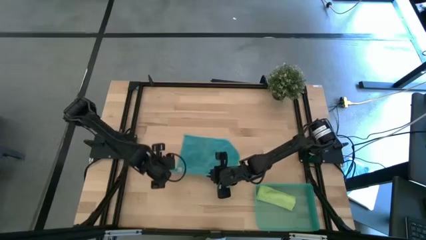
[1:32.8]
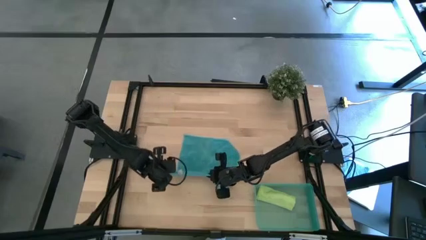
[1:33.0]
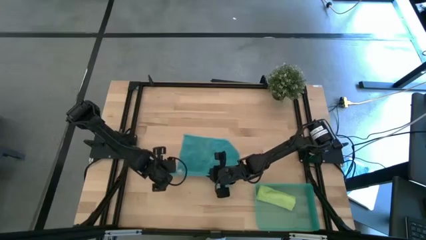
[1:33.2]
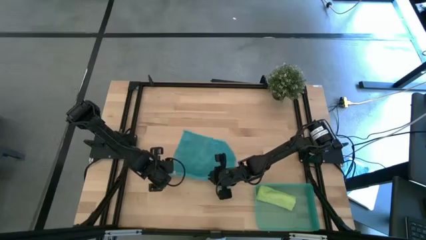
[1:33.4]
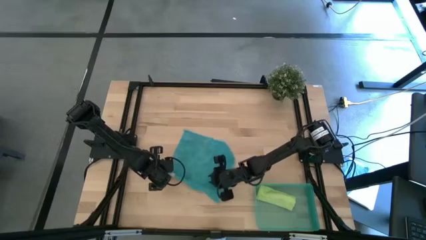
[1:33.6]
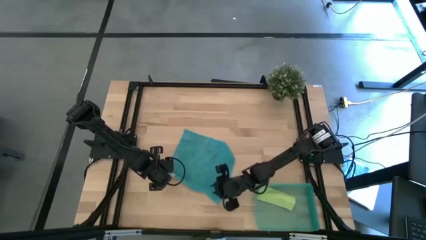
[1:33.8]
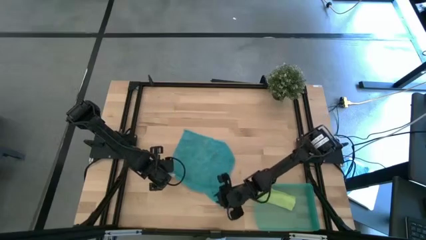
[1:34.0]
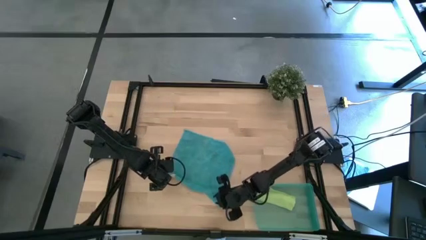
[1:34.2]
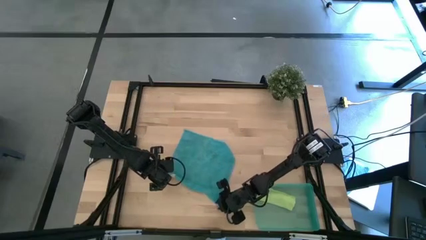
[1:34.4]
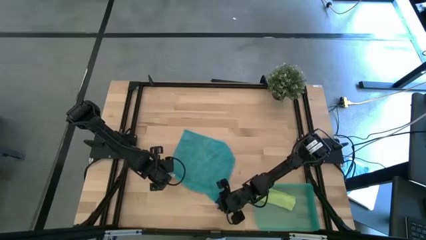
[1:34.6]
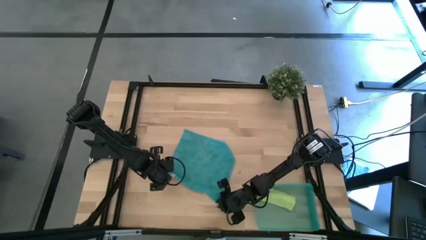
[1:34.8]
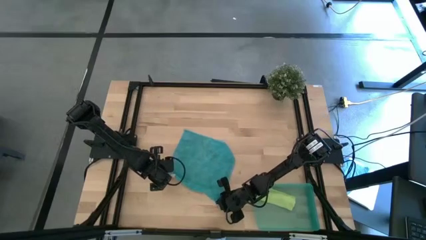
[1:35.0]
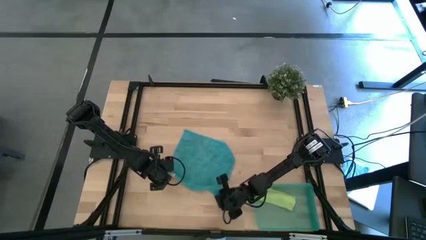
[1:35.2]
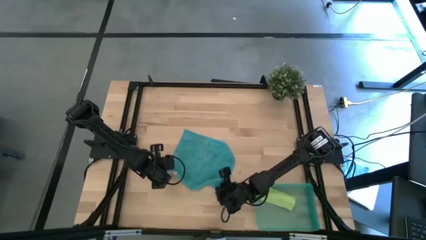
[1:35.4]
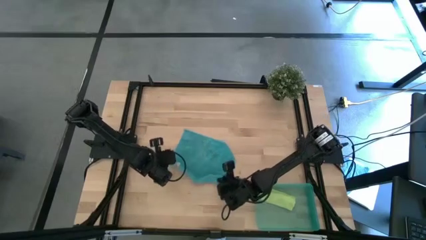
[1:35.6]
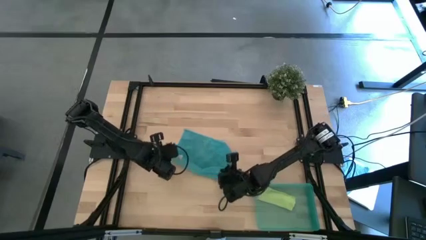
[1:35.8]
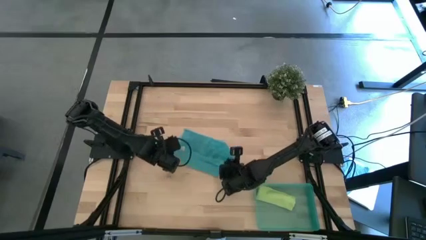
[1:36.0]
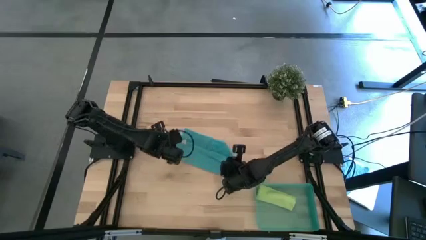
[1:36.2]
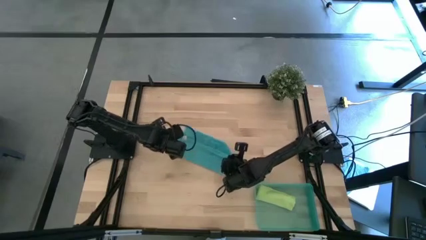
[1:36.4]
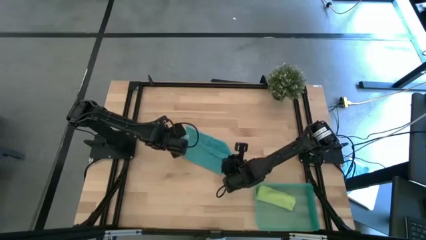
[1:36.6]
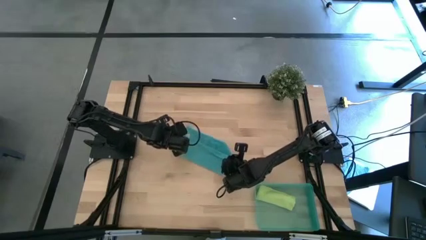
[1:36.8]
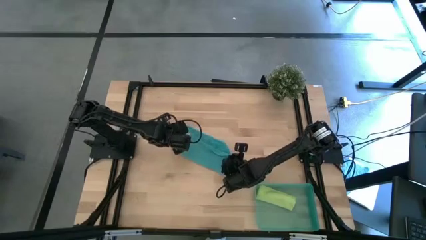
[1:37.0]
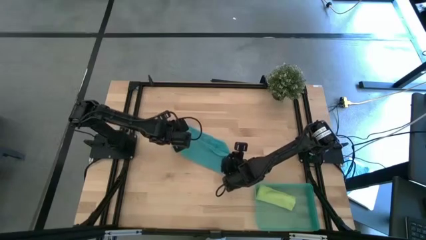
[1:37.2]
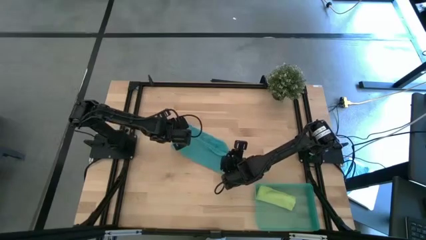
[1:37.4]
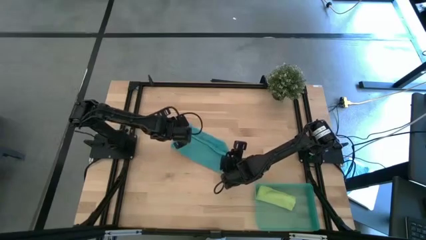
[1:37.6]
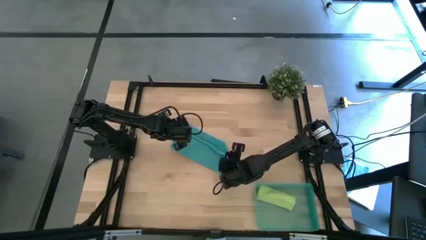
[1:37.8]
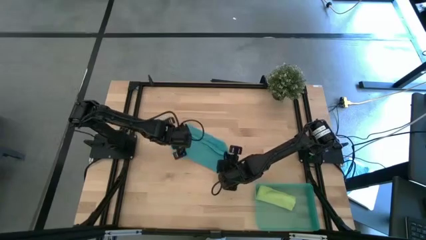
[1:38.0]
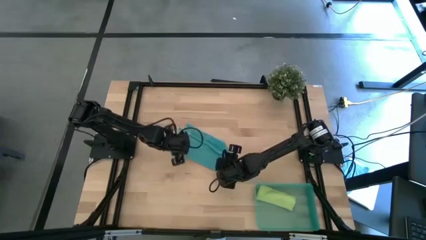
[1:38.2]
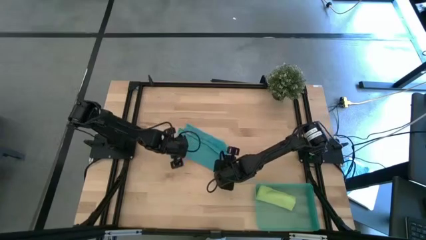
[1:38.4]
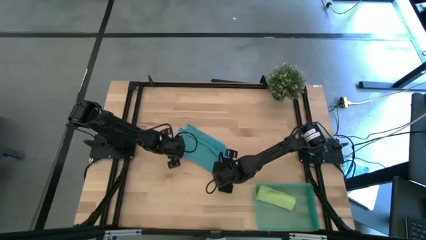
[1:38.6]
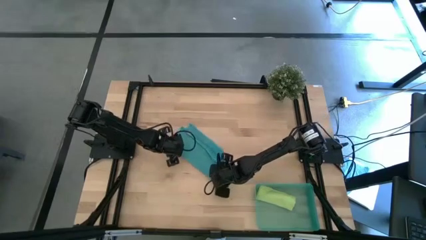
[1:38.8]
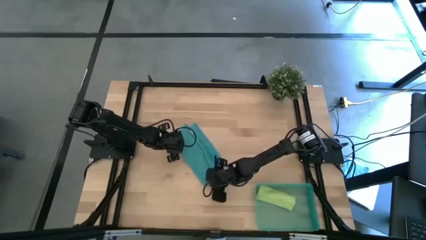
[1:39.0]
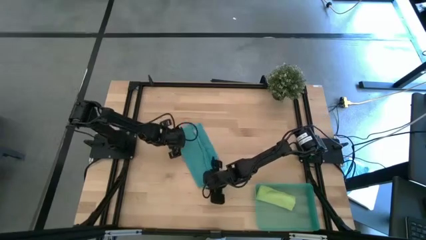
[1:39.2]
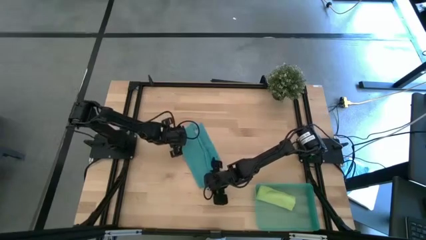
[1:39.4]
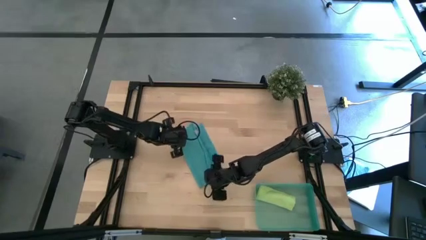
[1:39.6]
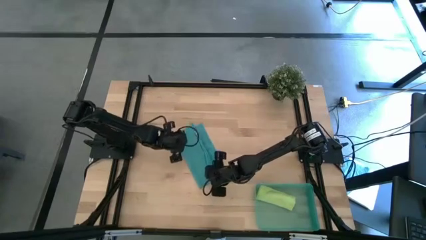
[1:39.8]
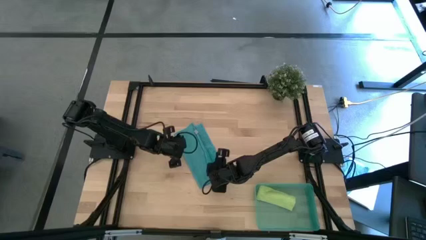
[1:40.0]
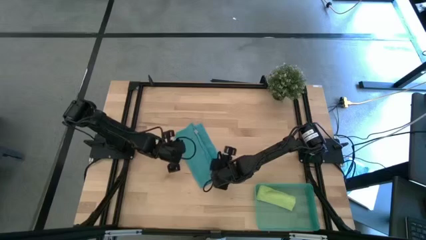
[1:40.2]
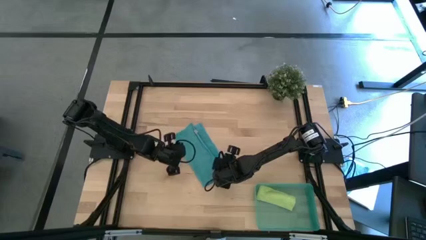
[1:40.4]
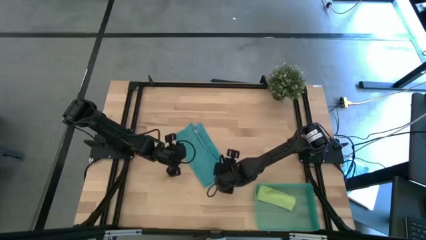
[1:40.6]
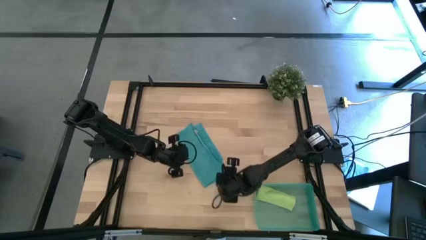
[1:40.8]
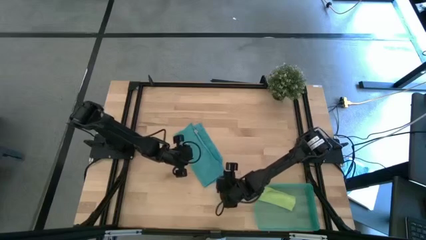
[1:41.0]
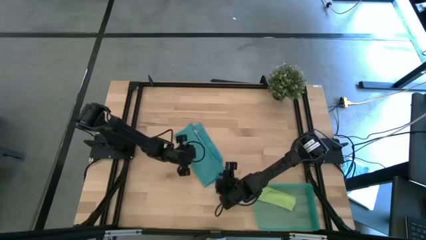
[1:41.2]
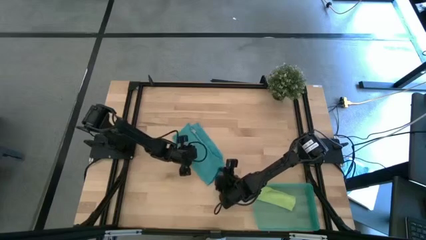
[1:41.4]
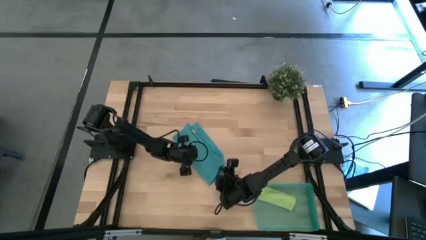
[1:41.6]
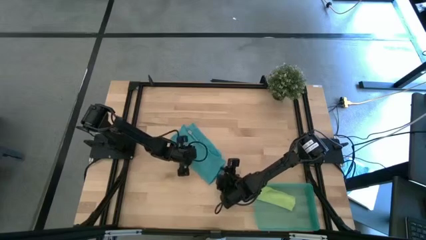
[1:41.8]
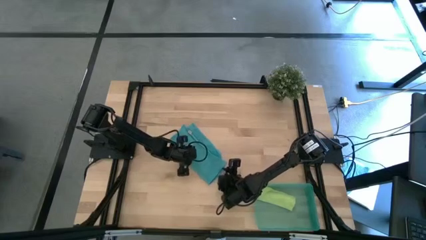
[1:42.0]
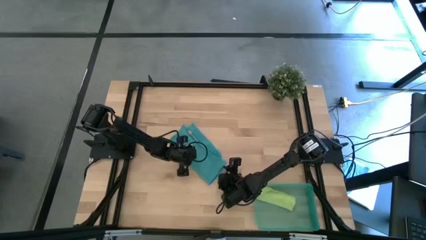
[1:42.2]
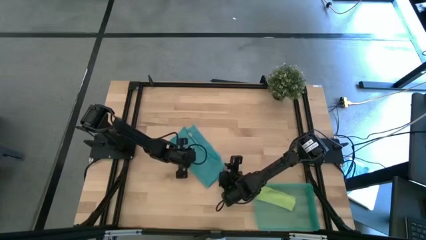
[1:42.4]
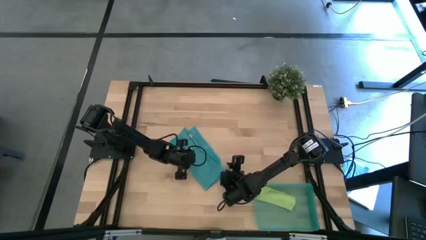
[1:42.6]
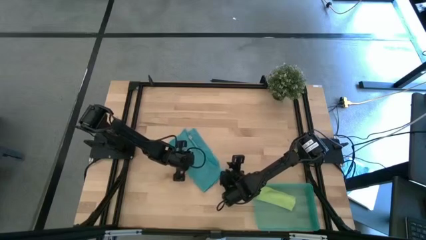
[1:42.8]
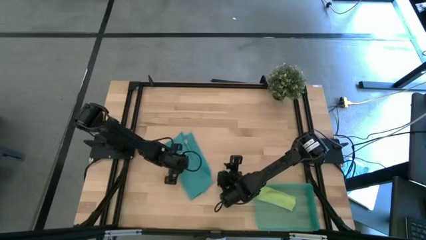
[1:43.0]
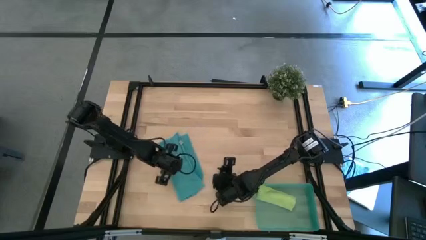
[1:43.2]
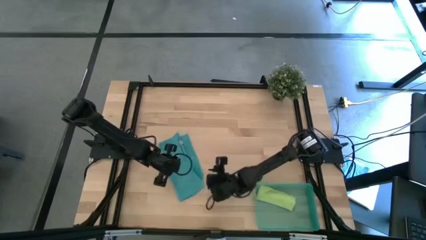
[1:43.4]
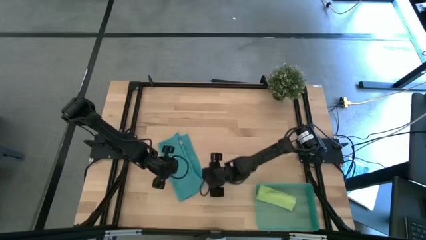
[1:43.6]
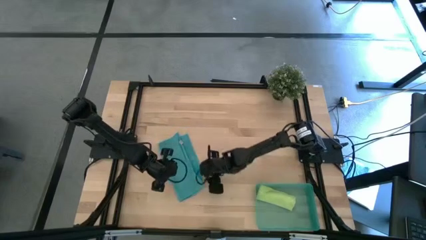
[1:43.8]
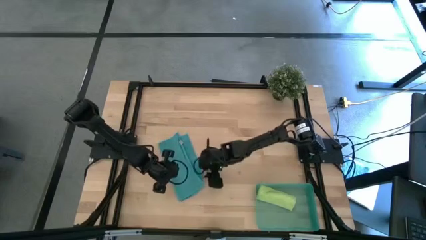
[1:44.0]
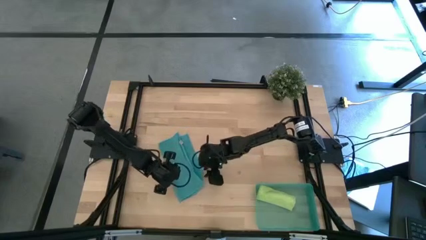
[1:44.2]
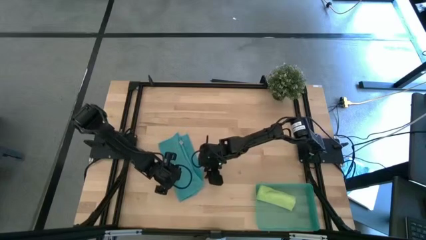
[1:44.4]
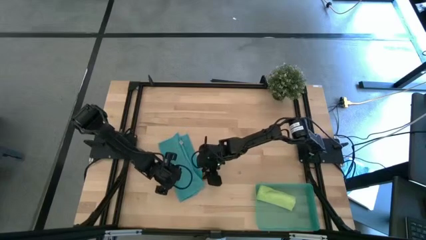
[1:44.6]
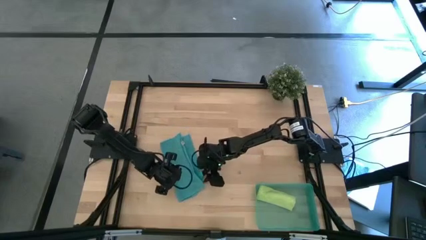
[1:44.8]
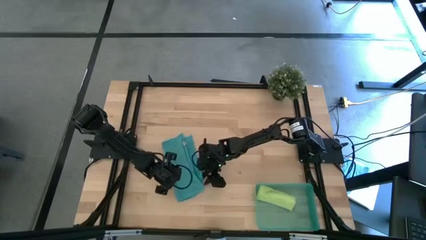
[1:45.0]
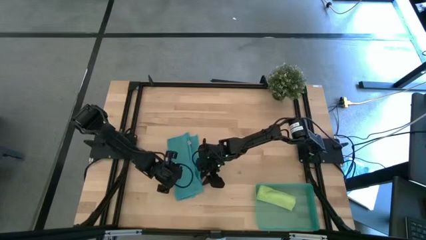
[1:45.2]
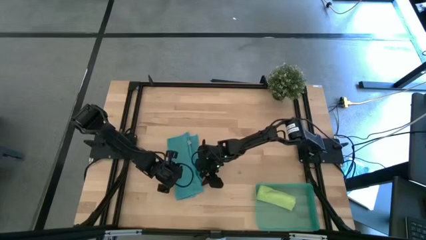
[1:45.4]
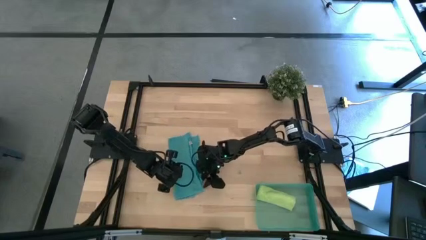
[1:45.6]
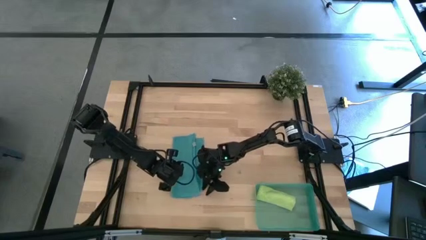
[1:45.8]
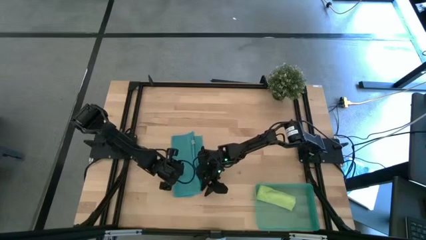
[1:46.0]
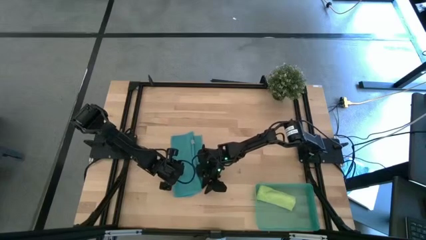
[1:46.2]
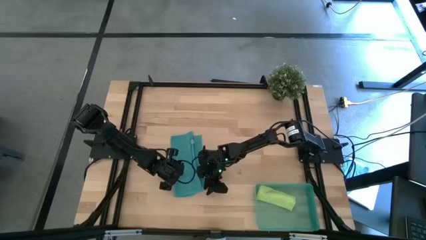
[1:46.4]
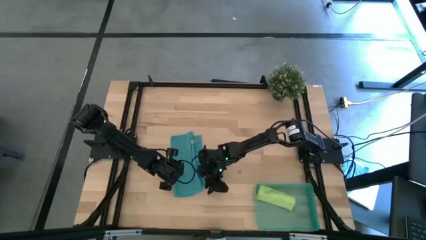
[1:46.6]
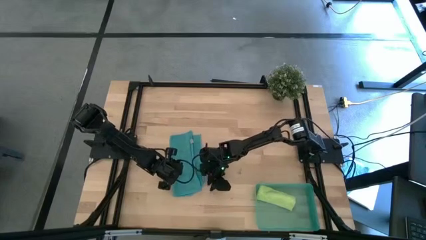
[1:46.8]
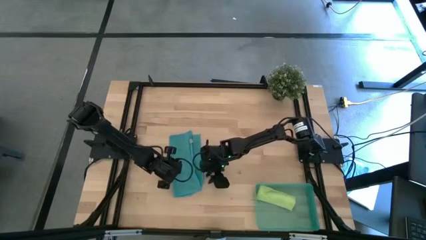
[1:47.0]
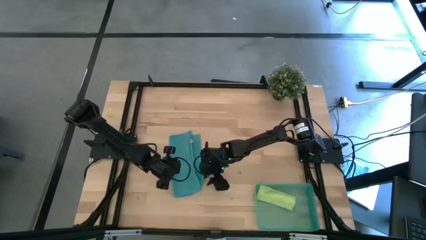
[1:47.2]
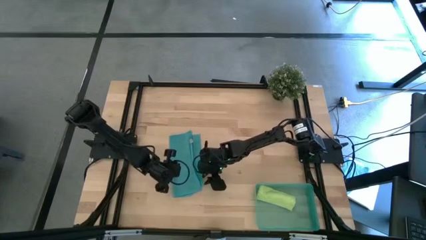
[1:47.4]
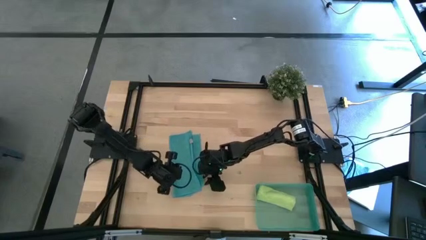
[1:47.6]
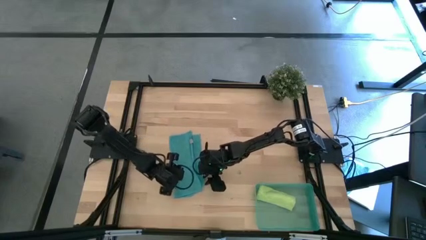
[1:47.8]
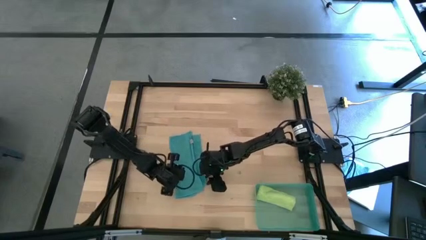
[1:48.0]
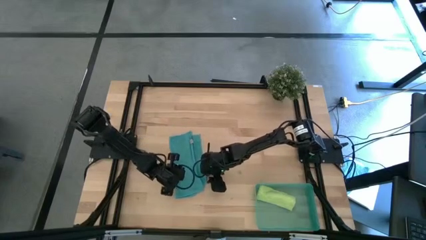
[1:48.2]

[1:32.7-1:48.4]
Task: Roll microfiber towels into tight, uniform cylinder then place into a basket
Fold the blue microfiber cloth
